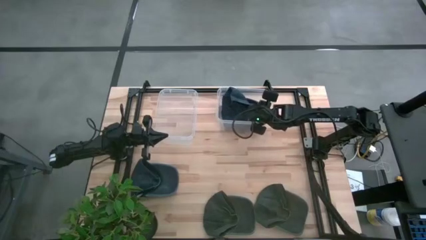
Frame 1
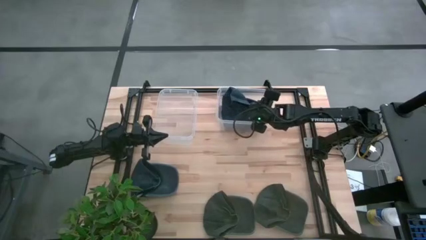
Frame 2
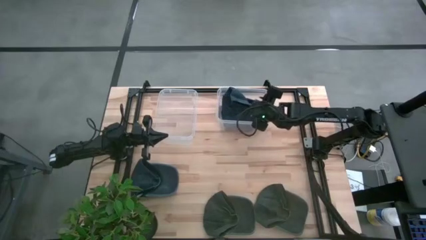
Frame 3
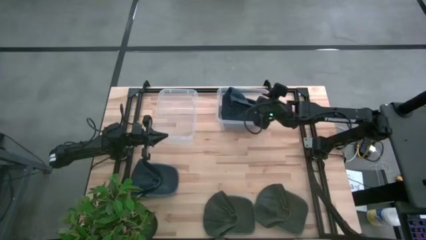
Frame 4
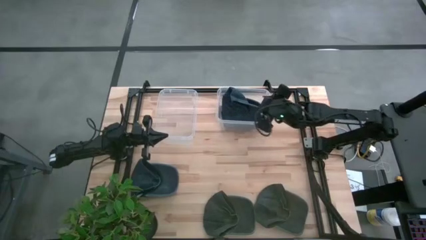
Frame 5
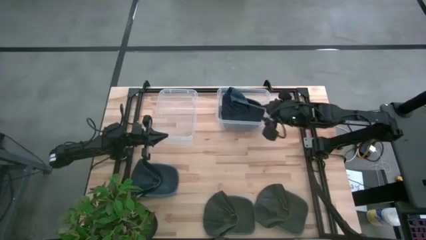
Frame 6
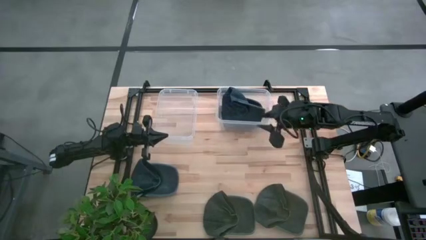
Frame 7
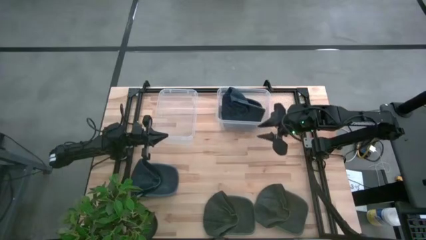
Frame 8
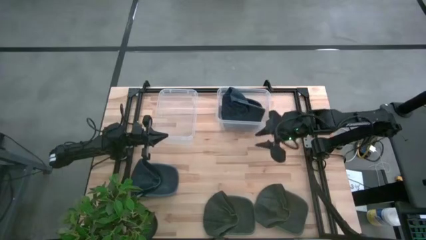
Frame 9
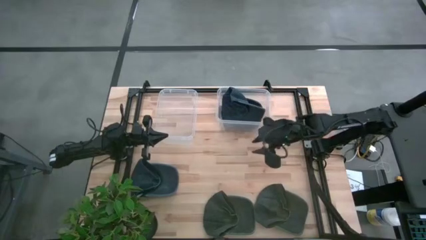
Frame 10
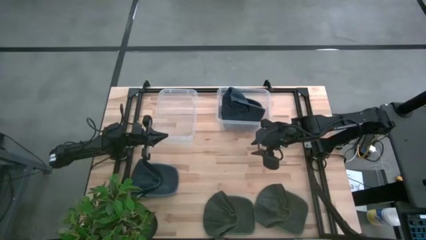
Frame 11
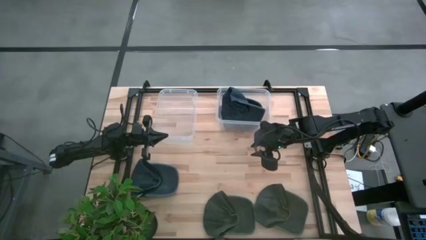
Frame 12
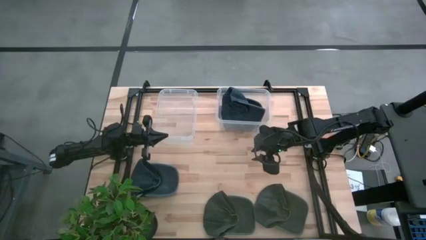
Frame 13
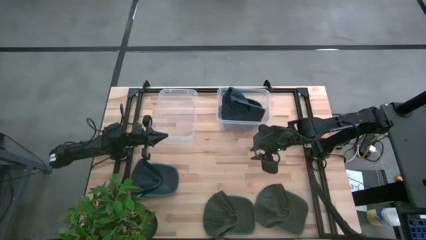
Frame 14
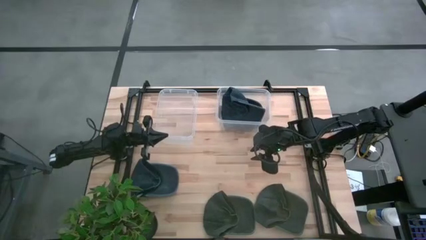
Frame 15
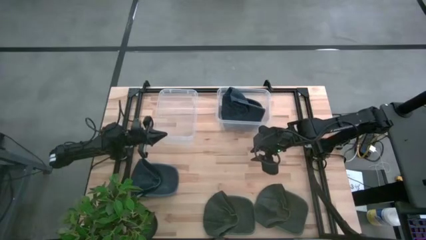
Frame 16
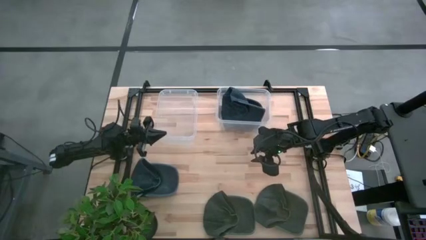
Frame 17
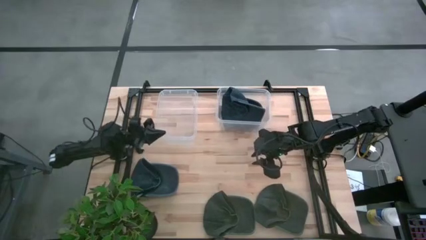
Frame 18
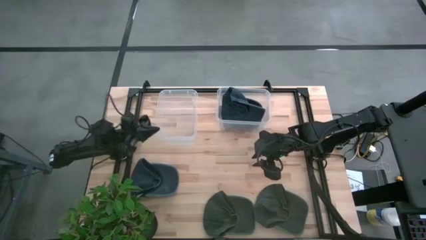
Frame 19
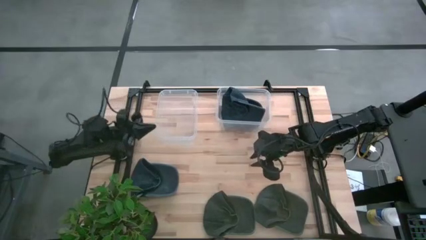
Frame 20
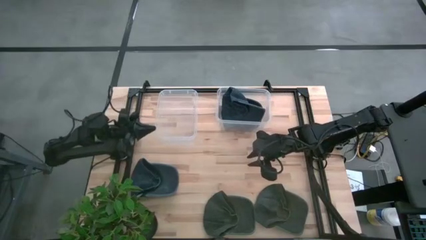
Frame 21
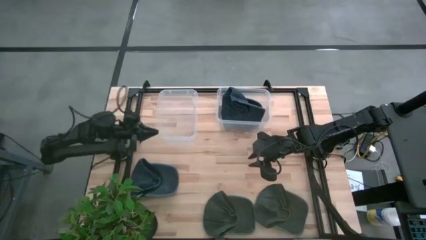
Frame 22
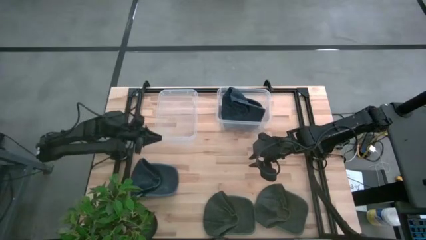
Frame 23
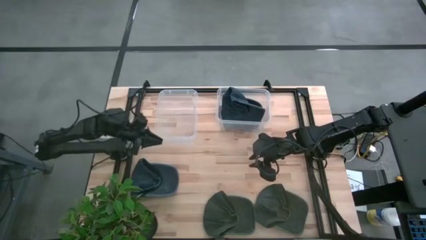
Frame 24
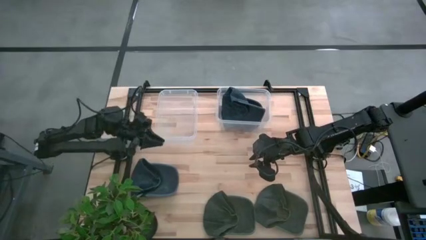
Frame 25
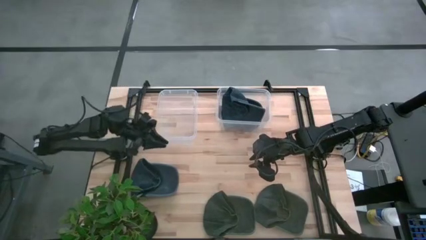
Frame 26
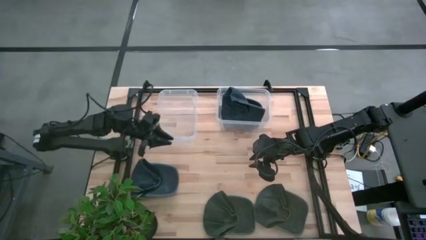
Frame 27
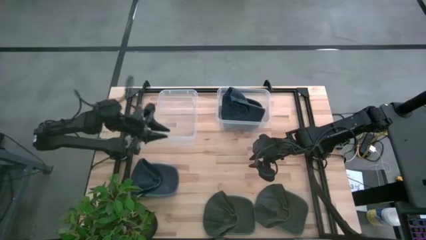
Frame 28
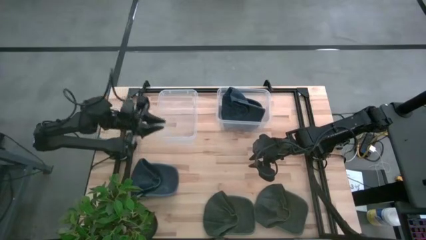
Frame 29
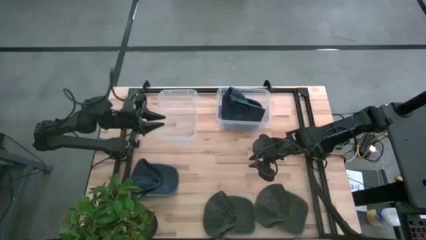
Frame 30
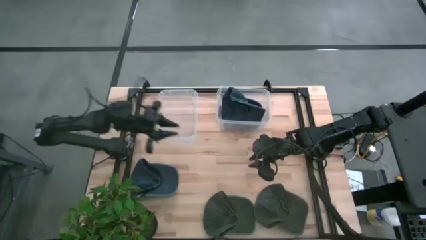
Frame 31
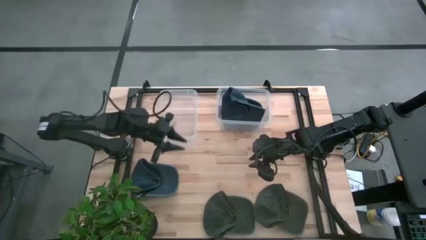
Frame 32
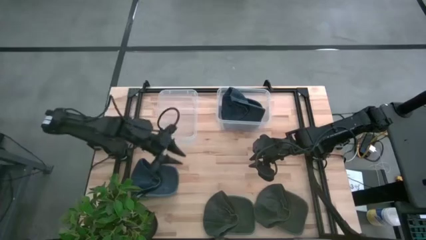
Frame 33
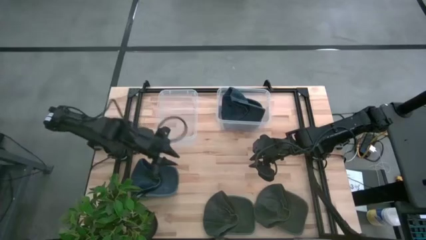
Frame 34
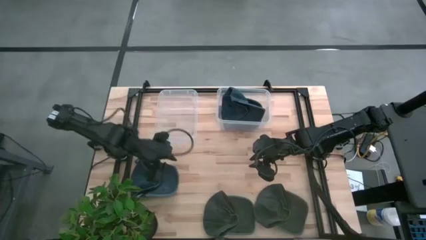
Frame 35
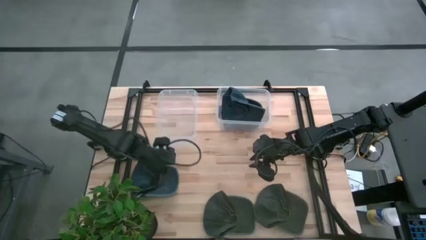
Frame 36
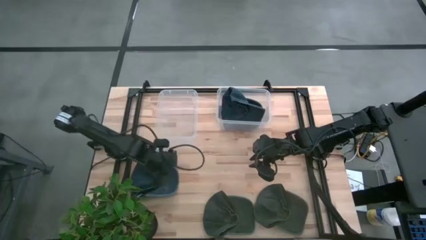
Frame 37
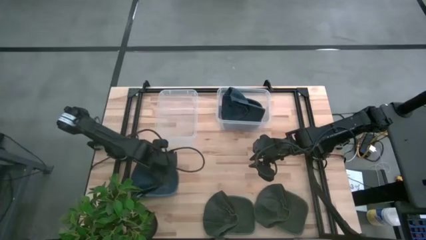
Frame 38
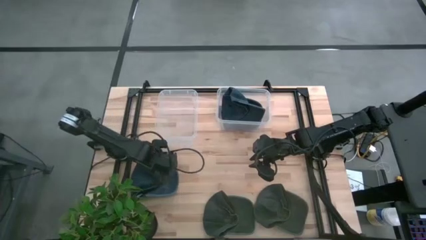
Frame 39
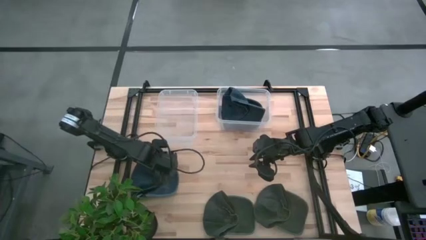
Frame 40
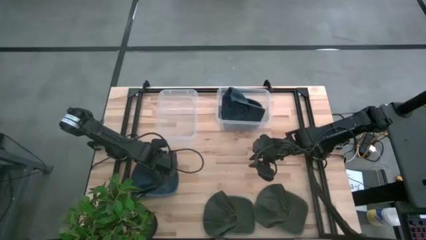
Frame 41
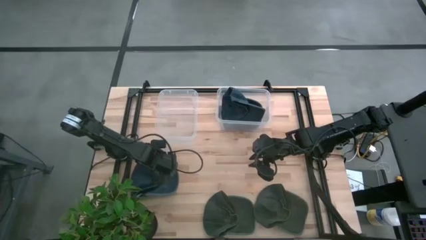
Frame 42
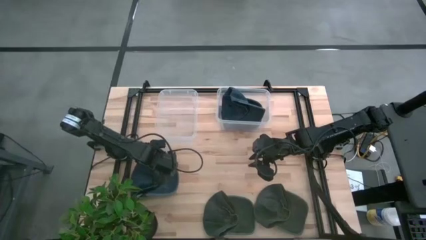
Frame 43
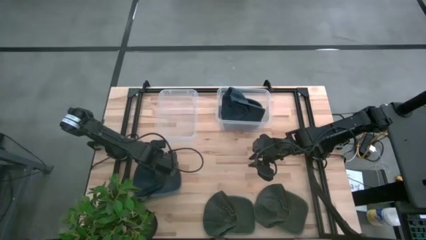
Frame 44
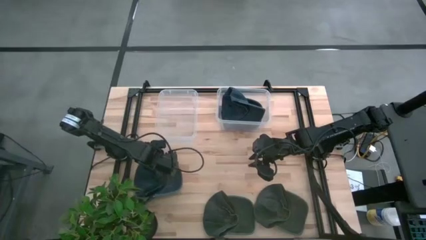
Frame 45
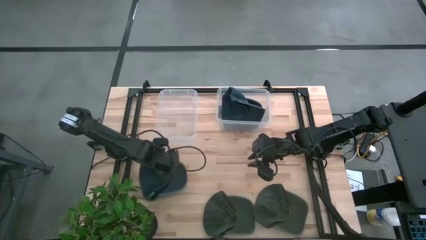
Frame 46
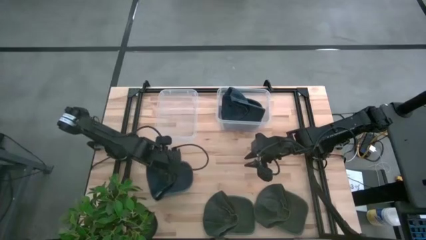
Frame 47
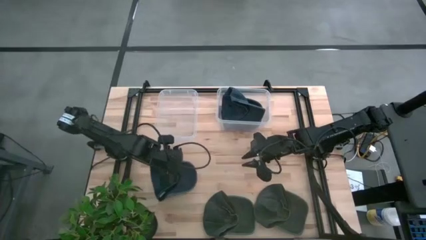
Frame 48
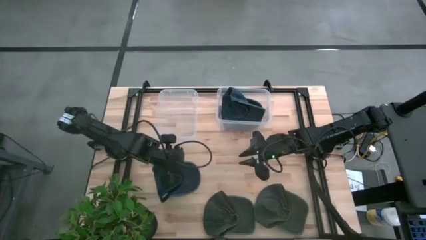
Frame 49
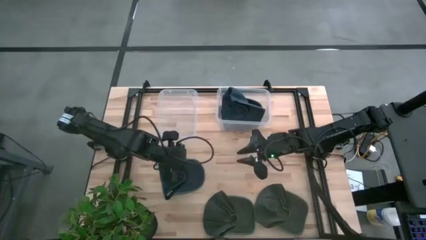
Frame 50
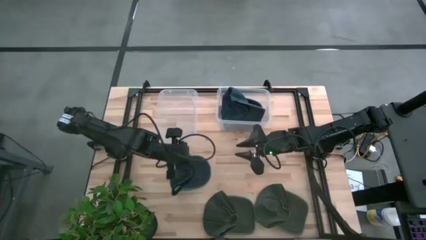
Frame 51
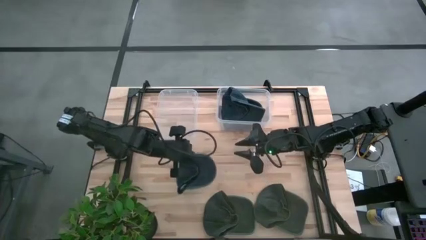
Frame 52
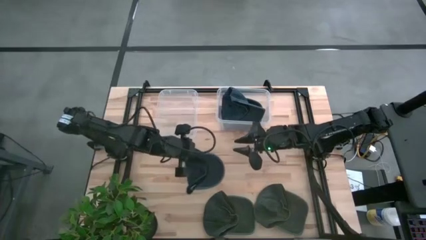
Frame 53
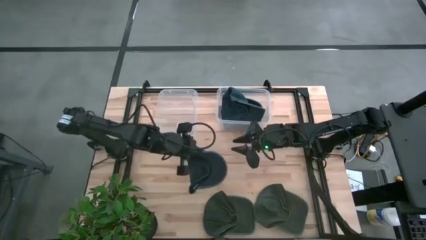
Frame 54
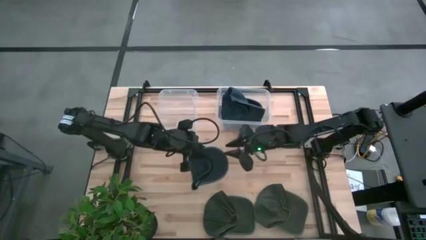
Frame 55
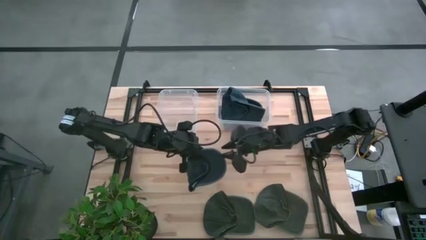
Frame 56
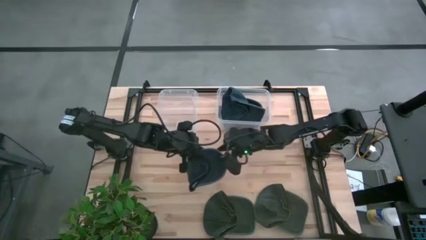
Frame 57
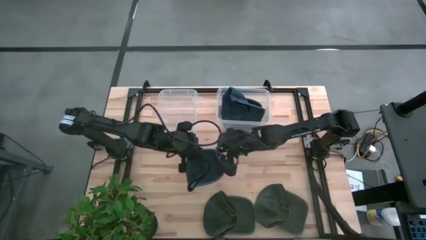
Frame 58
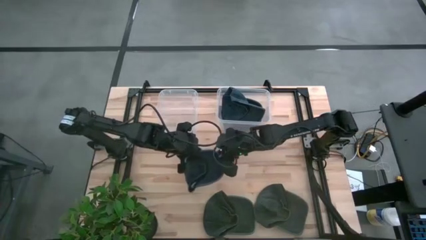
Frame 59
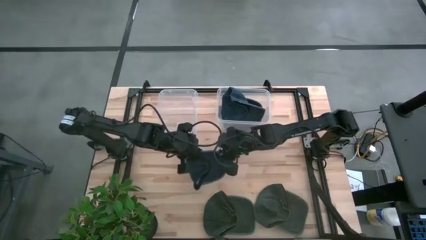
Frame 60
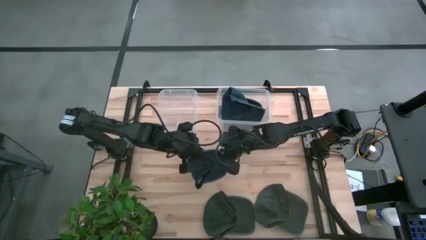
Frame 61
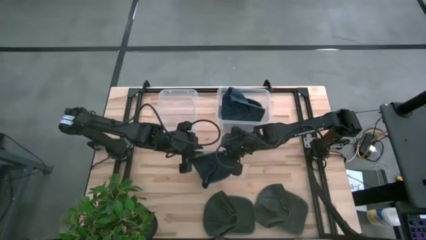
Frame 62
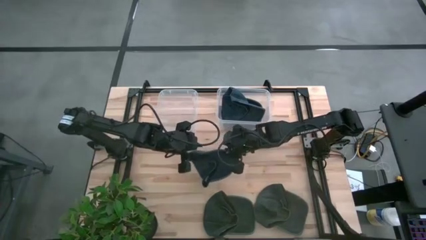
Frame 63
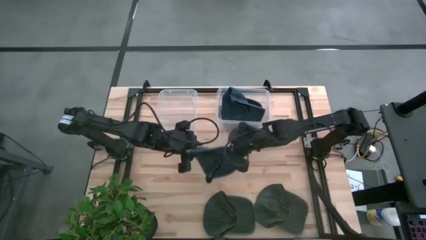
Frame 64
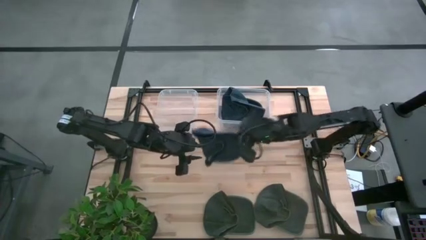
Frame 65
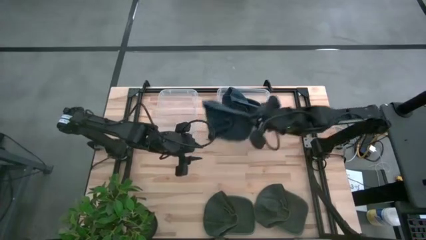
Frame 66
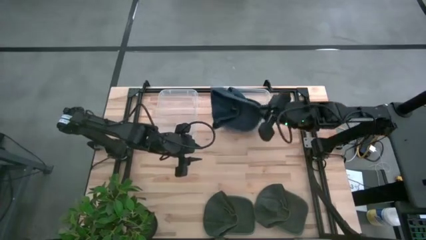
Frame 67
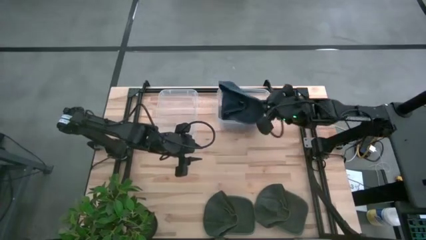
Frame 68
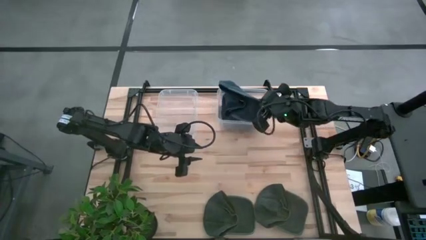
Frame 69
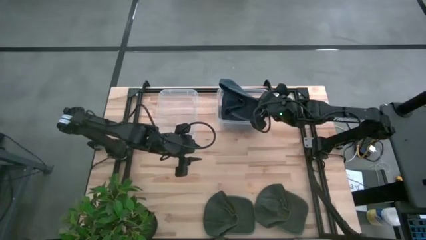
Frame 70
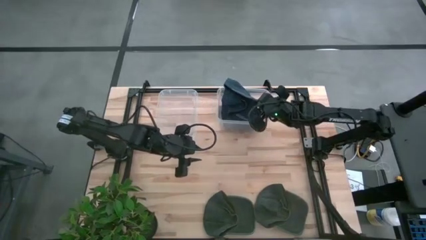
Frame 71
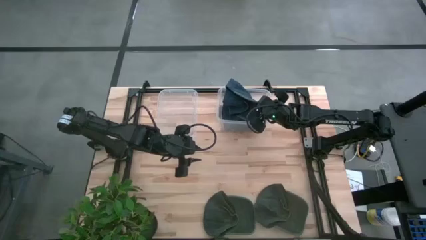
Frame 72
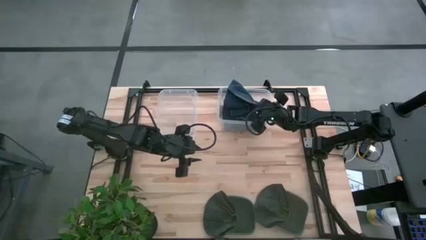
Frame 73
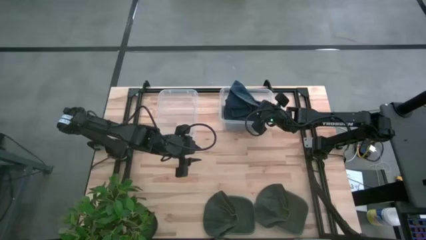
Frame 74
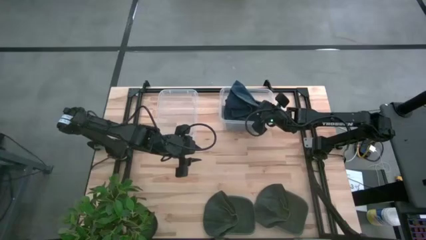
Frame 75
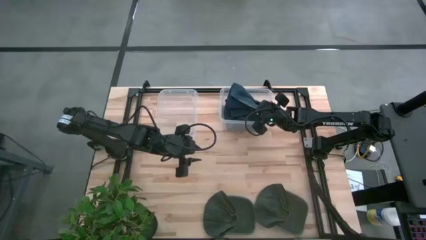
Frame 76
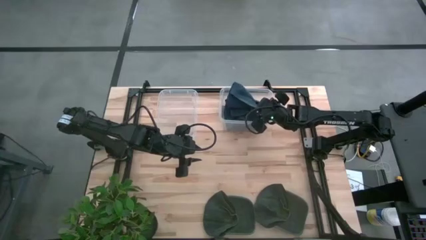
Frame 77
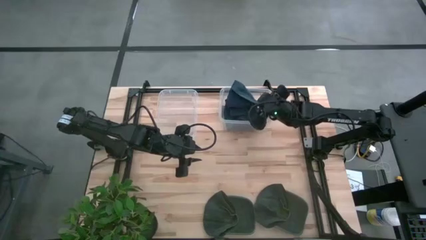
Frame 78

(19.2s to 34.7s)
Task: Pick & Place hat
Put the blue cap into the right transparent bin
